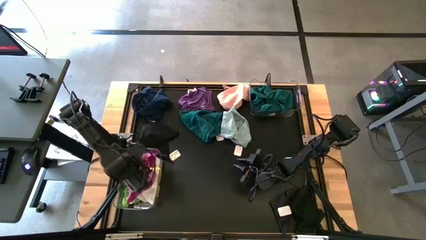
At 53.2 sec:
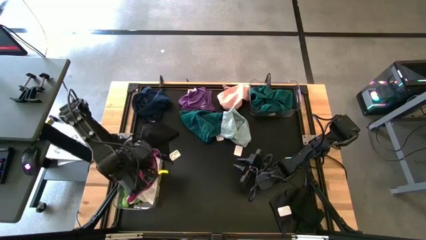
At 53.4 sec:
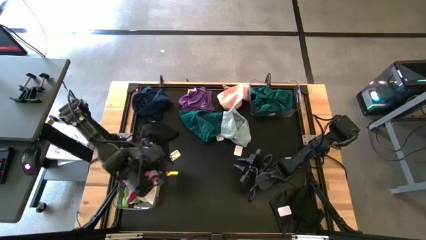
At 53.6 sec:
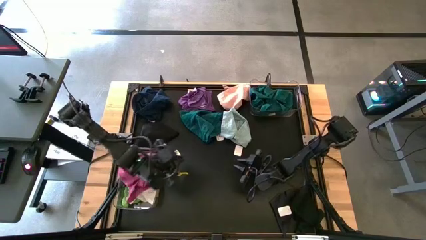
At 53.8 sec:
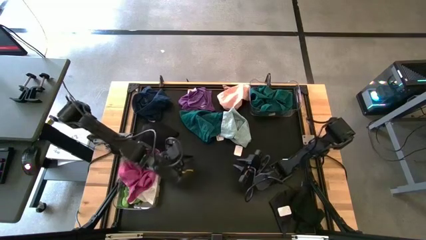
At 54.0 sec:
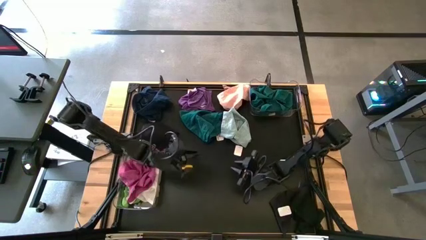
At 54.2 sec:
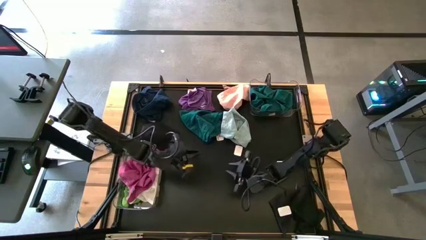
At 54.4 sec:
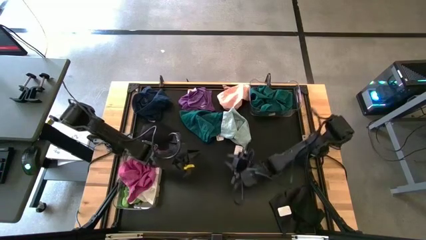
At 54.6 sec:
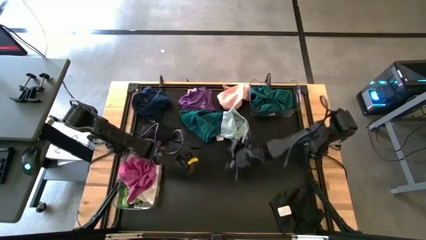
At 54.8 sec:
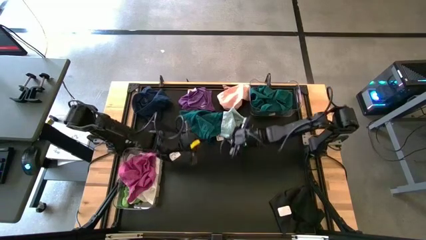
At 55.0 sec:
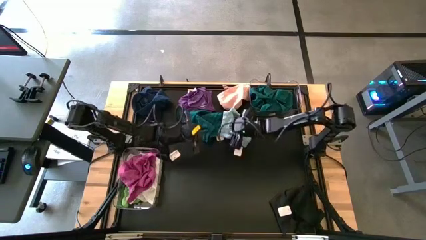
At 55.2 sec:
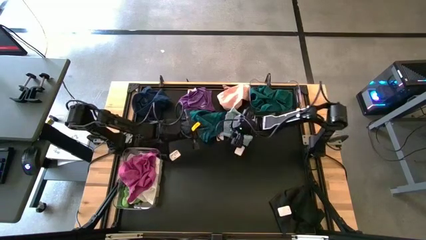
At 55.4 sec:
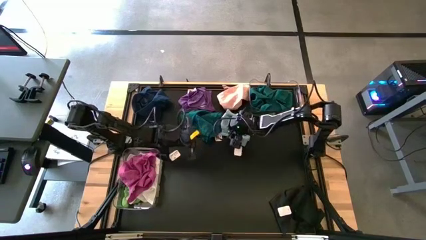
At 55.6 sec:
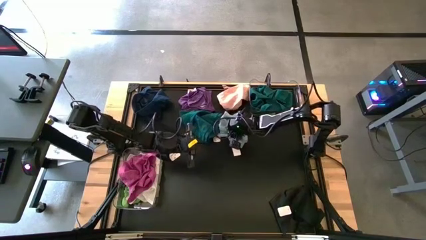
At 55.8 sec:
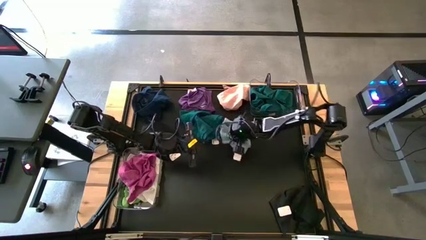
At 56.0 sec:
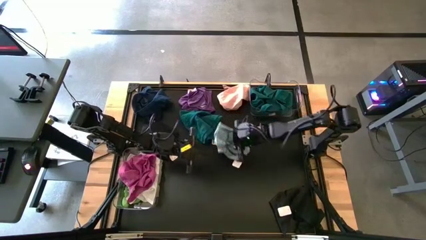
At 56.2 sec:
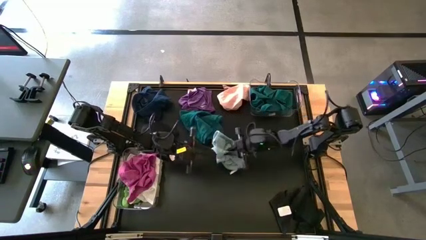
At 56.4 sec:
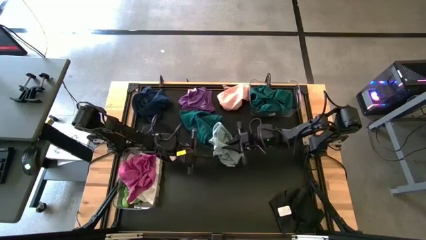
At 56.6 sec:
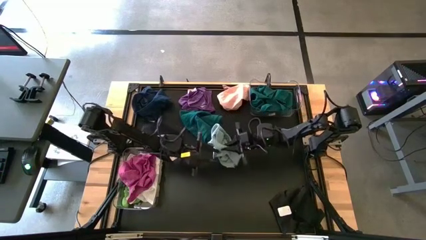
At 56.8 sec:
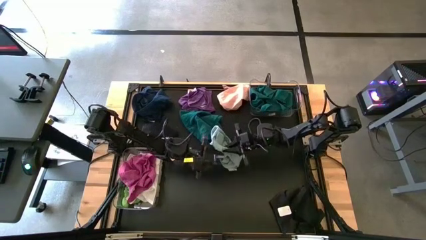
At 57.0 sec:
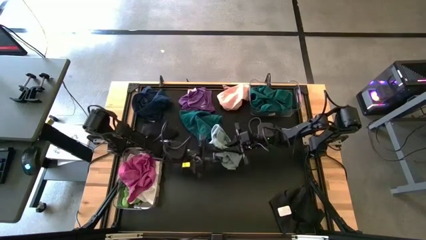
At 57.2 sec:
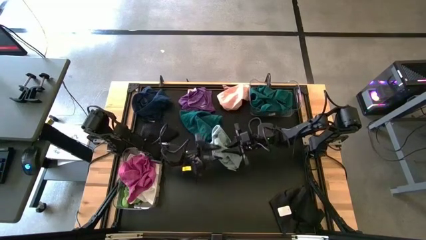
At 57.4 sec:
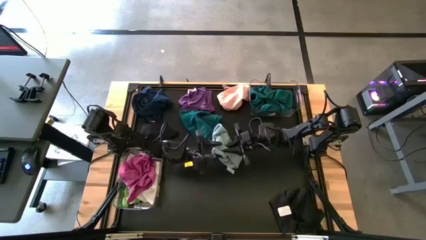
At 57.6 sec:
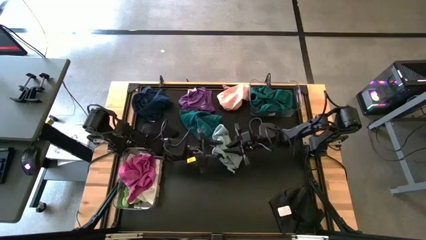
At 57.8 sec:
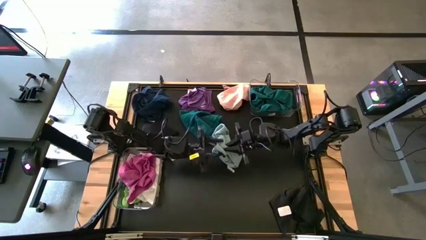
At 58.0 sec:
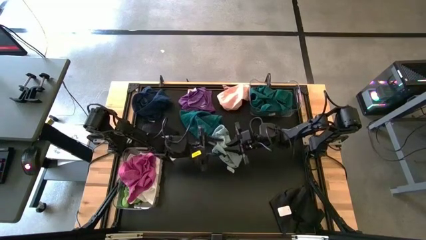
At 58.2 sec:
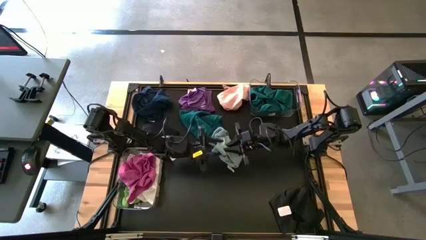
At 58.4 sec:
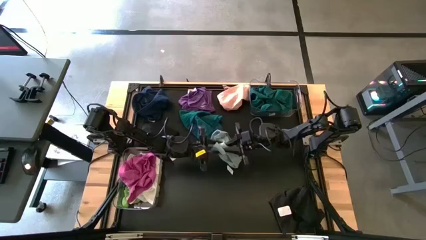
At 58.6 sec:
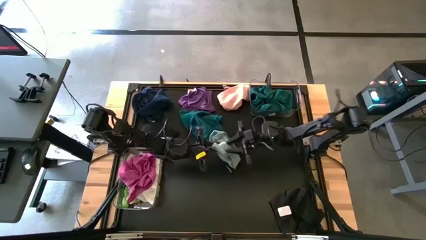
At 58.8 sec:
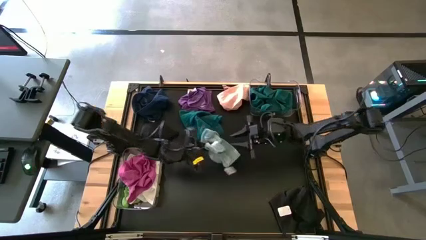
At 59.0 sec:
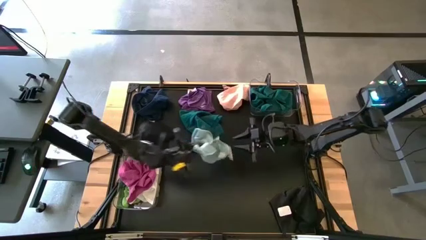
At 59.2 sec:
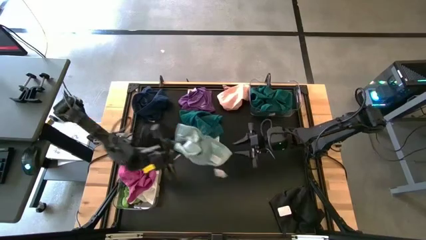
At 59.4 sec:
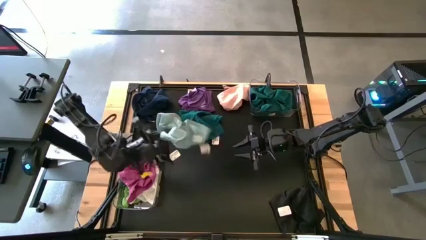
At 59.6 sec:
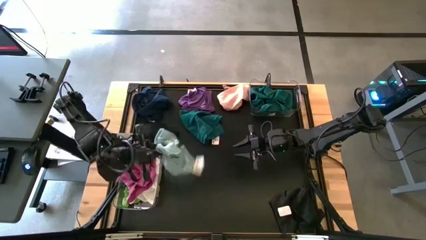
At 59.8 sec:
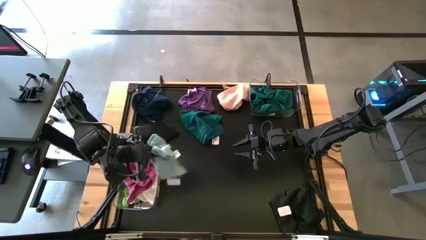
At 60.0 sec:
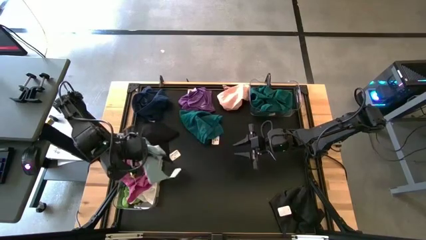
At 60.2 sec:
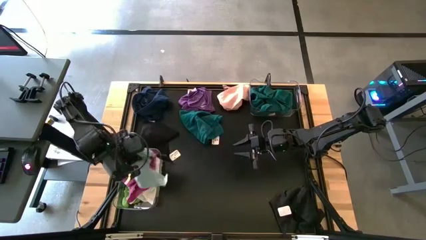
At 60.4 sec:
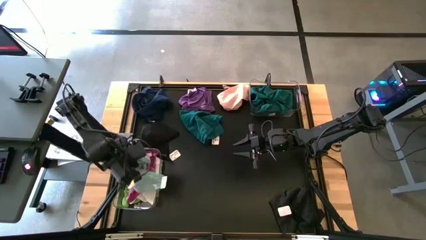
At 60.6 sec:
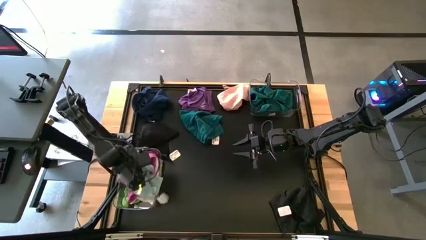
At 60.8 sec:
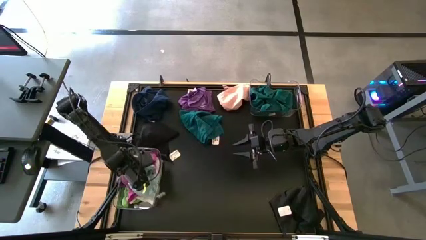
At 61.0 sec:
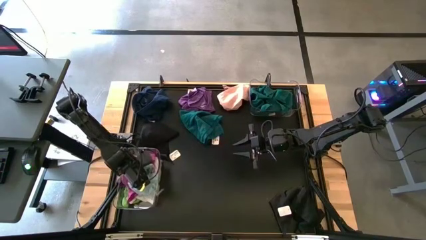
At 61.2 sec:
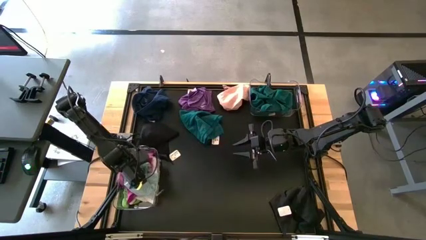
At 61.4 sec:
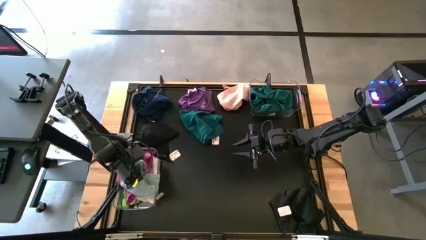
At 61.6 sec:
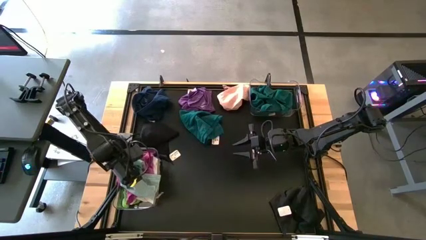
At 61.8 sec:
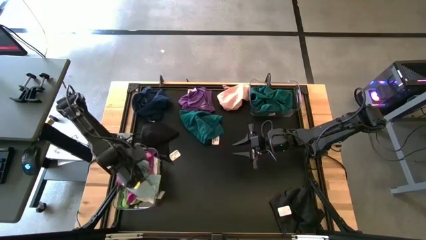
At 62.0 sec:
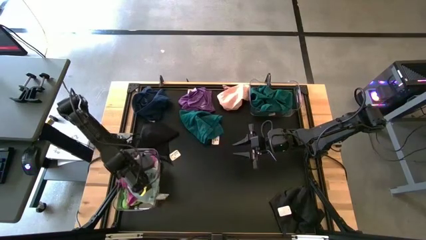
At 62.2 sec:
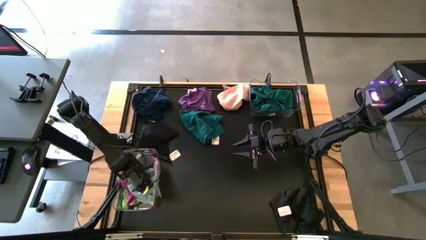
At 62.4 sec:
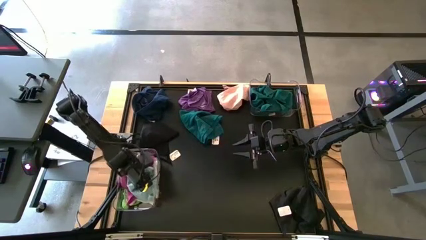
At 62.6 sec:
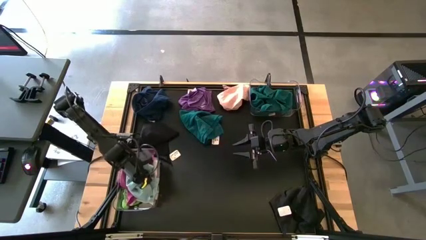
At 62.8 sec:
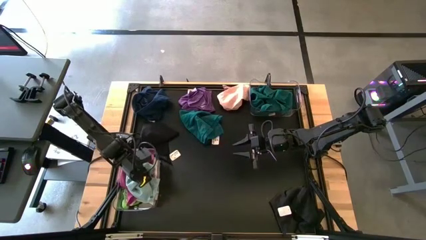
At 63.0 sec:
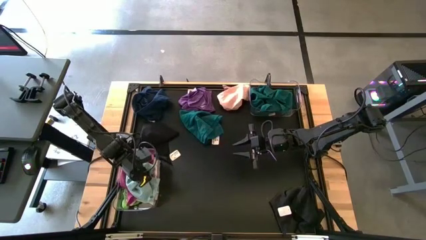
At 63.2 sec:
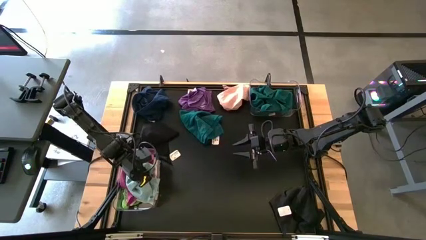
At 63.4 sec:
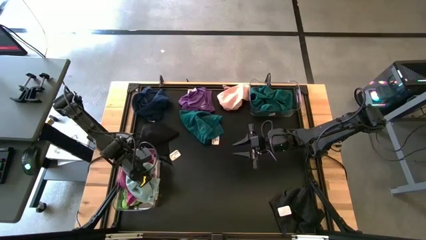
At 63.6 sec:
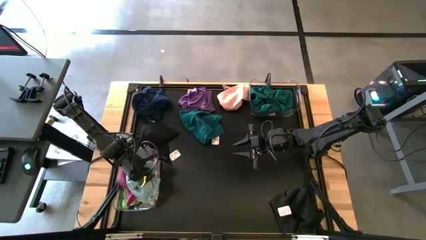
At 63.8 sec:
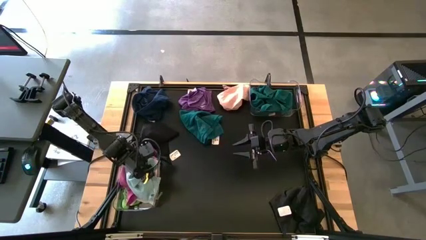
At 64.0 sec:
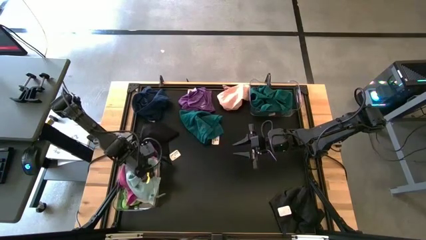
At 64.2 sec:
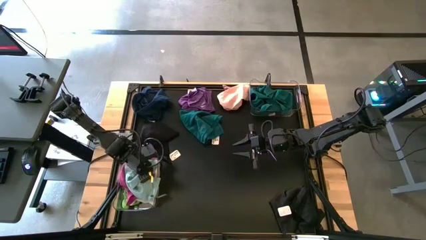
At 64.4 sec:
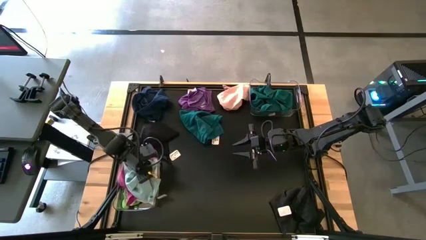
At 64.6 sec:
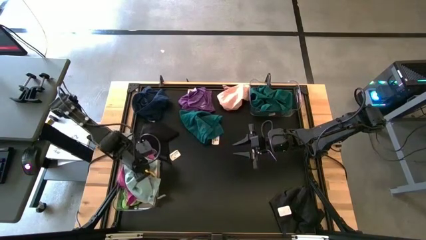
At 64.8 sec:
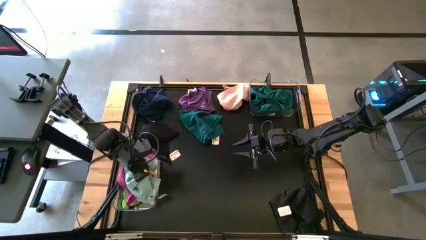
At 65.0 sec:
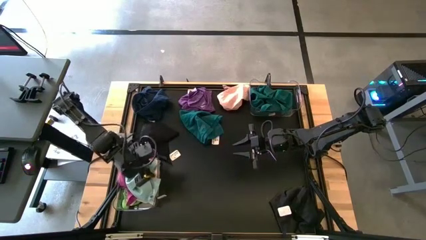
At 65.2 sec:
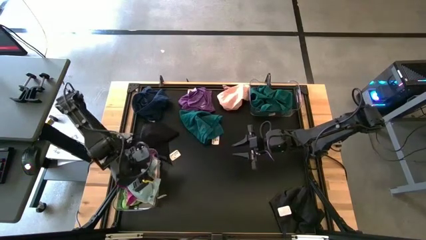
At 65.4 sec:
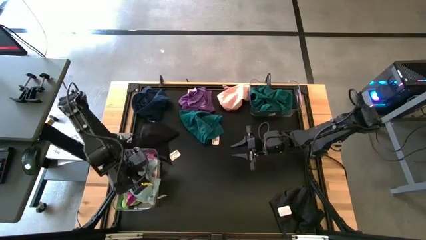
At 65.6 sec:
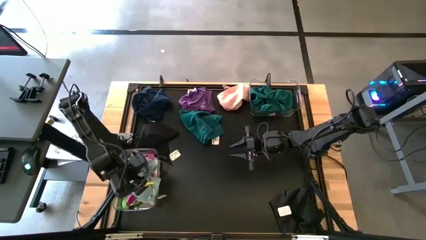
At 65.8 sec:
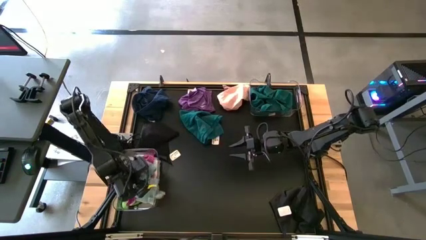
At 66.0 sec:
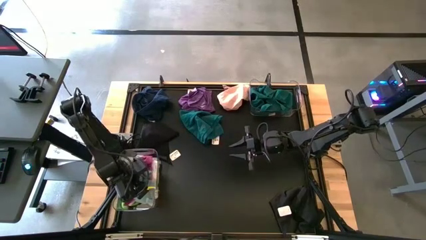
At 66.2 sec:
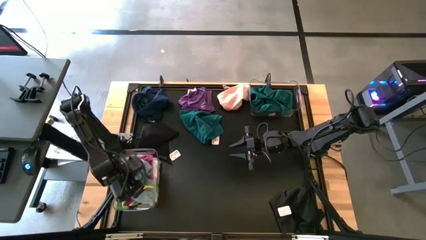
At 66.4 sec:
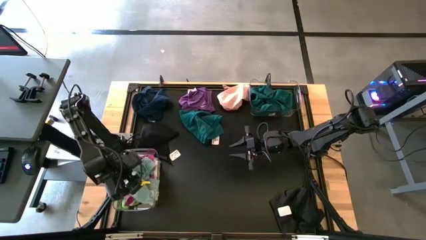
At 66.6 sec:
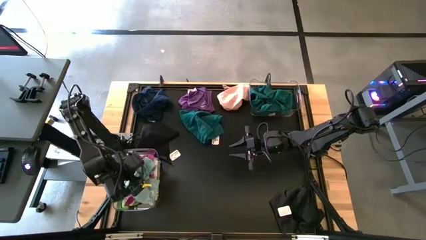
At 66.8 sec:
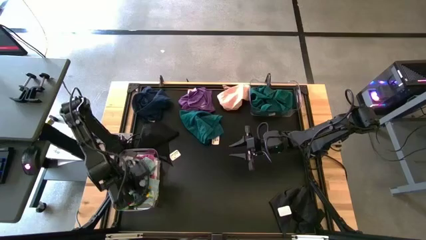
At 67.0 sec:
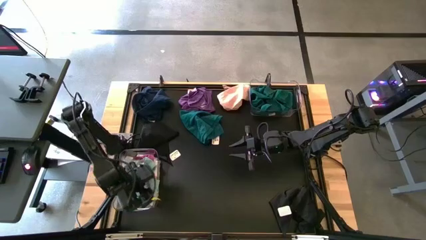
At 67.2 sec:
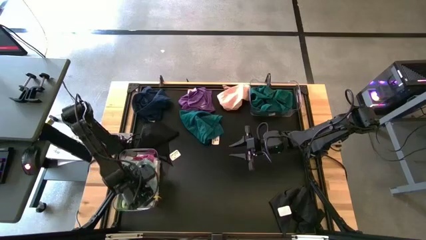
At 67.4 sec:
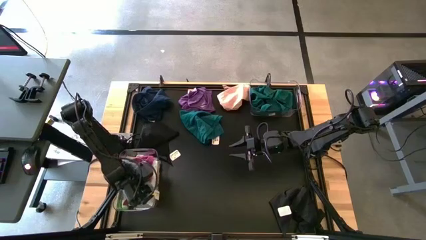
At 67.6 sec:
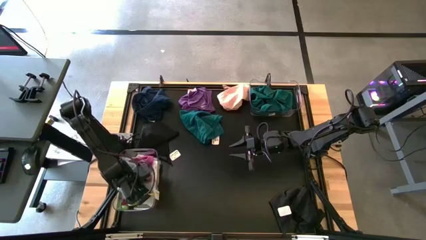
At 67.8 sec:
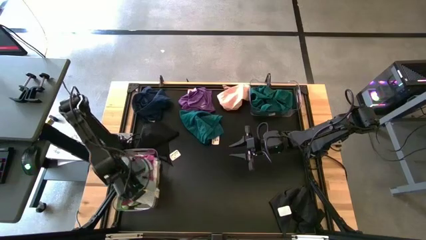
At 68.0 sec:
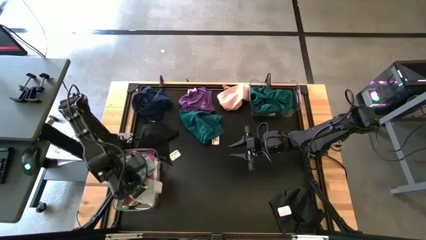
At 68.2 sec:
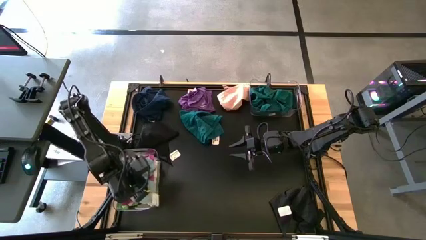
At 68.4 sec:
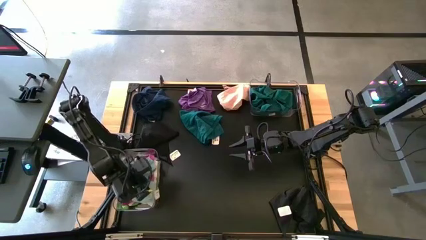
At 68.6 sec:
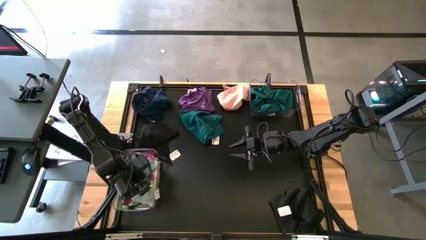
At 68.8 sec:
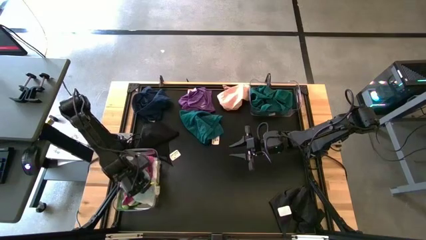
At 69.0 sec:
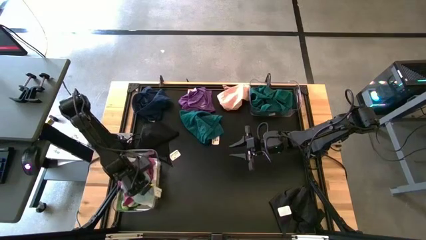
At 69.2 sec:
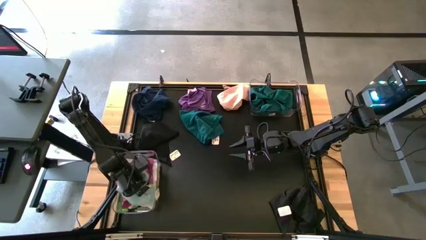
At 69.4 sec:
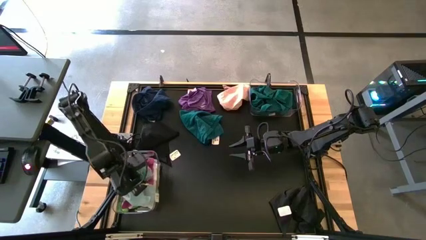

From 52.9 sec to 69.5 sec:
Task: Sort towels by color in basket
Put the light blue towel into the bottom transparent bin
